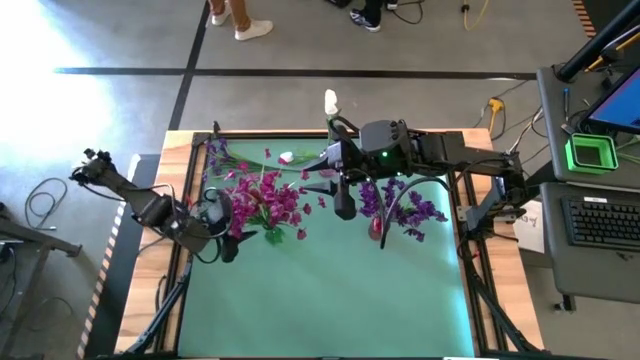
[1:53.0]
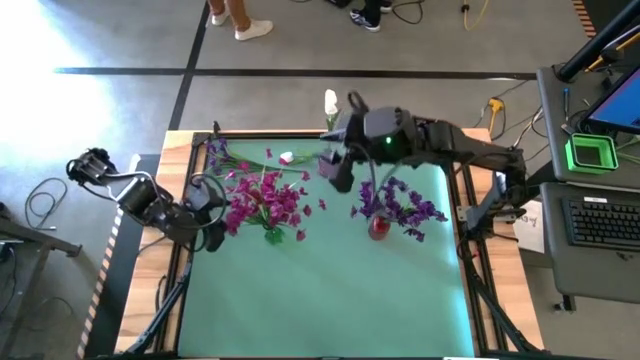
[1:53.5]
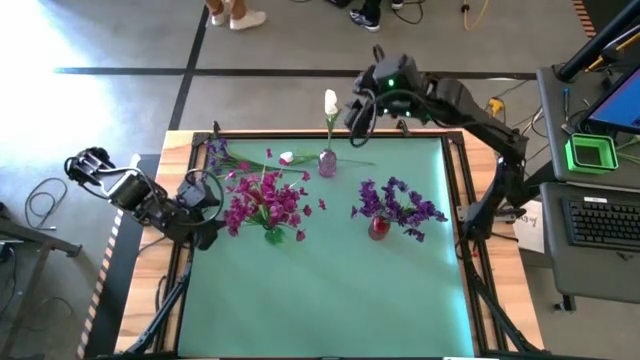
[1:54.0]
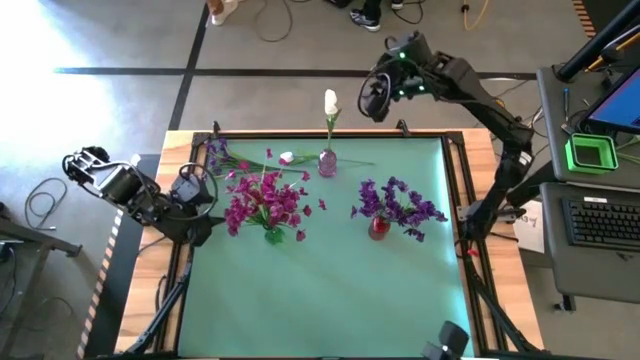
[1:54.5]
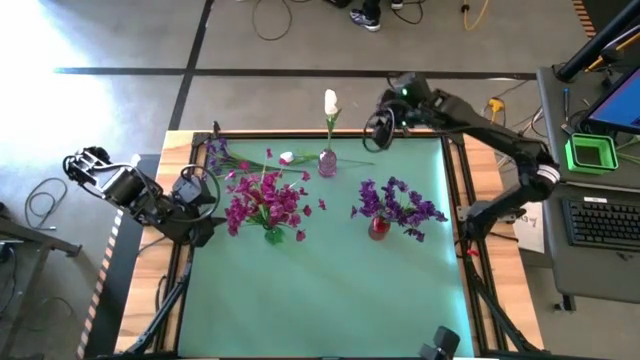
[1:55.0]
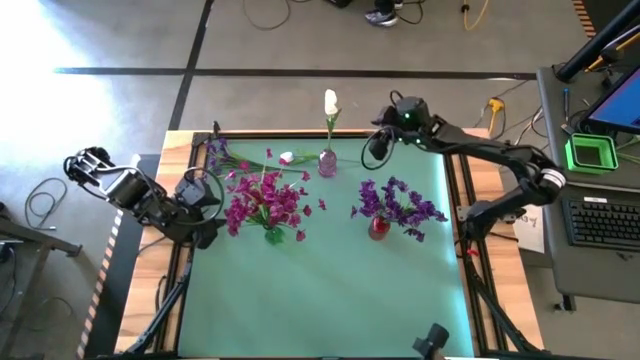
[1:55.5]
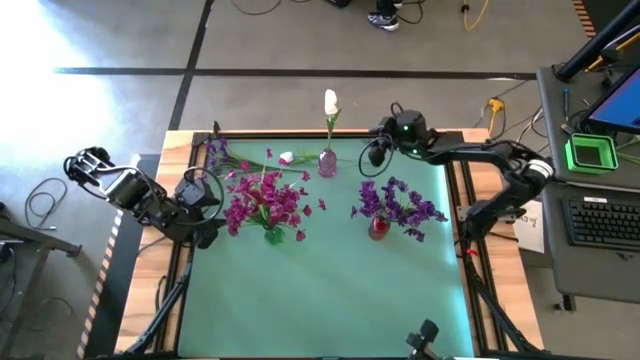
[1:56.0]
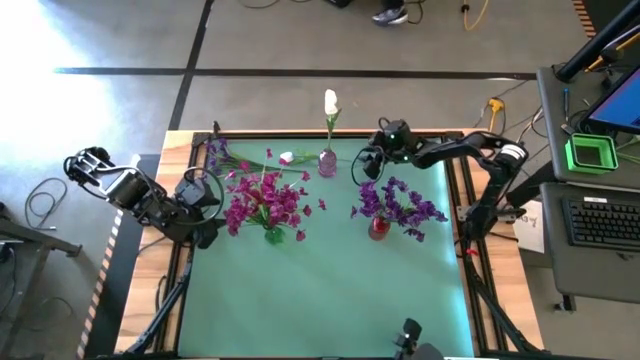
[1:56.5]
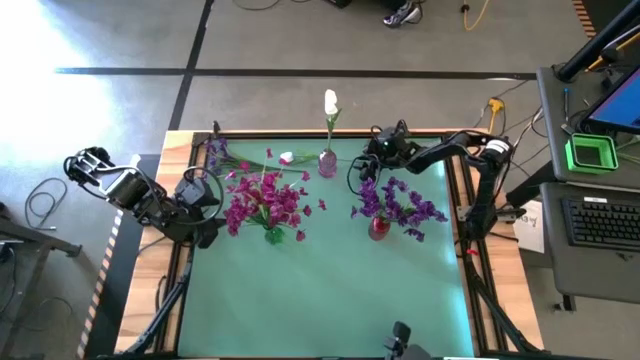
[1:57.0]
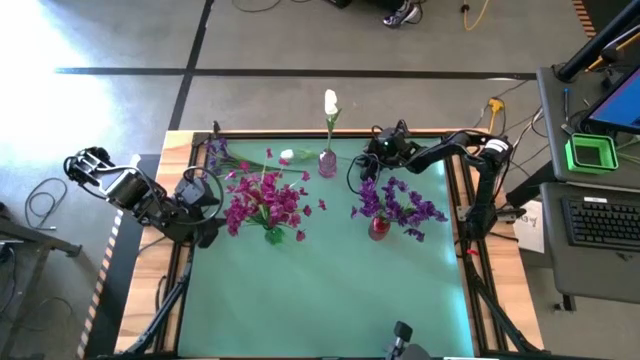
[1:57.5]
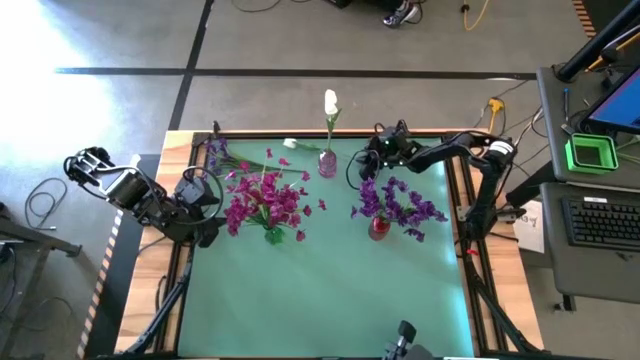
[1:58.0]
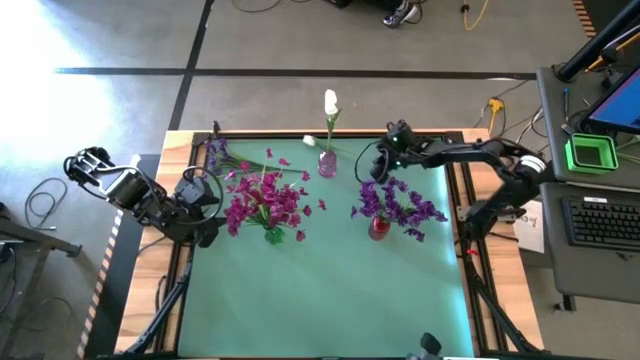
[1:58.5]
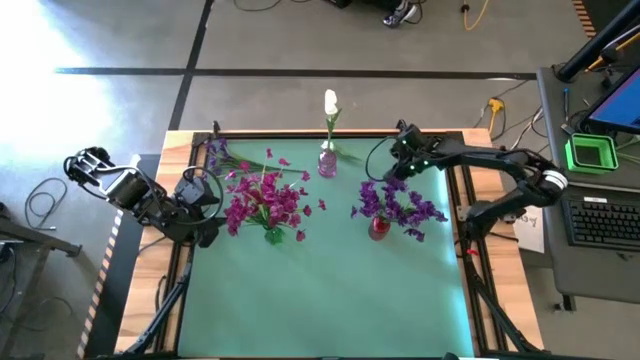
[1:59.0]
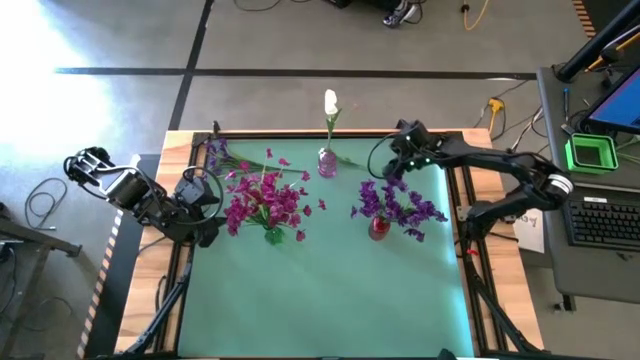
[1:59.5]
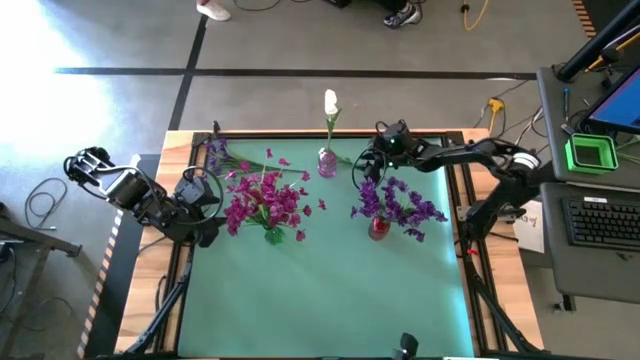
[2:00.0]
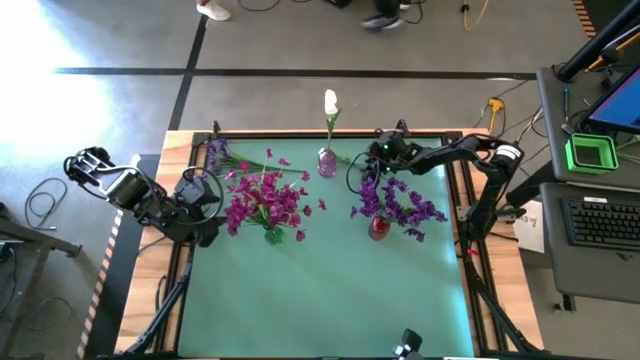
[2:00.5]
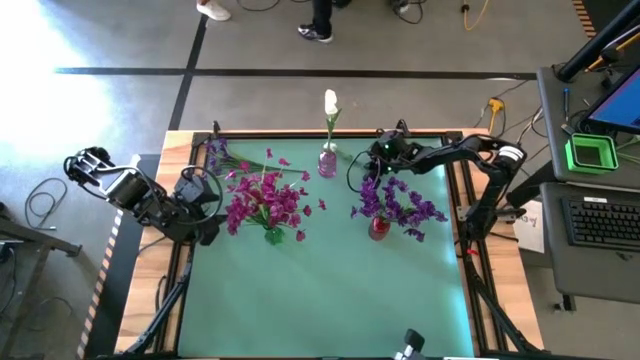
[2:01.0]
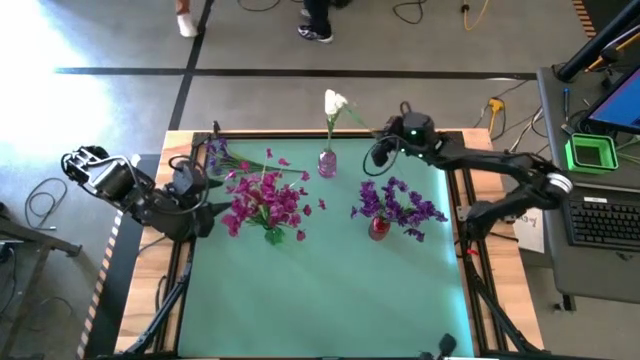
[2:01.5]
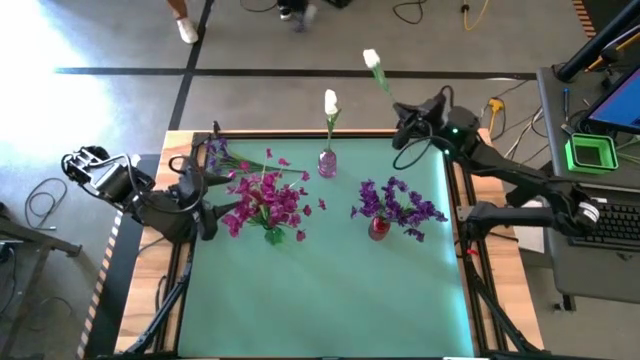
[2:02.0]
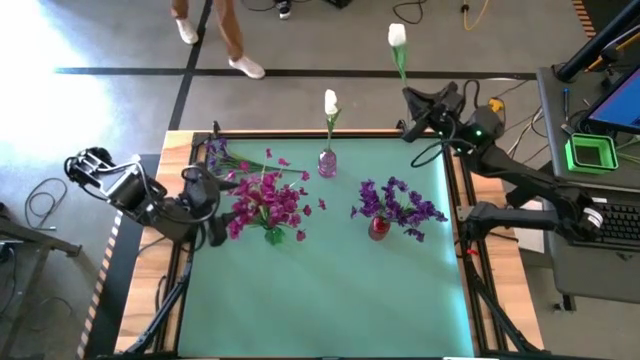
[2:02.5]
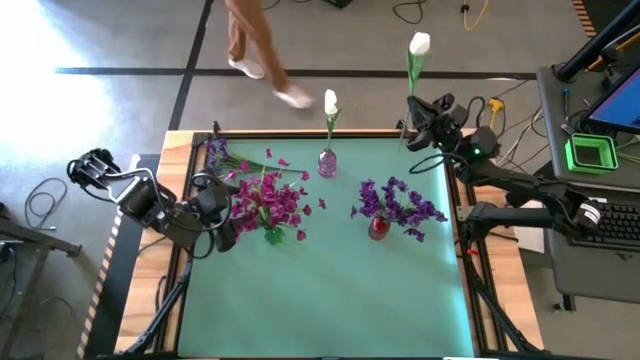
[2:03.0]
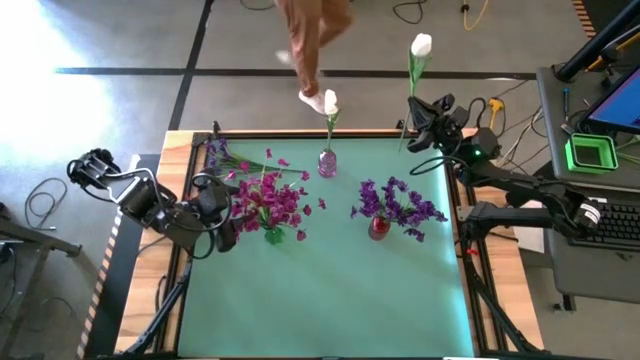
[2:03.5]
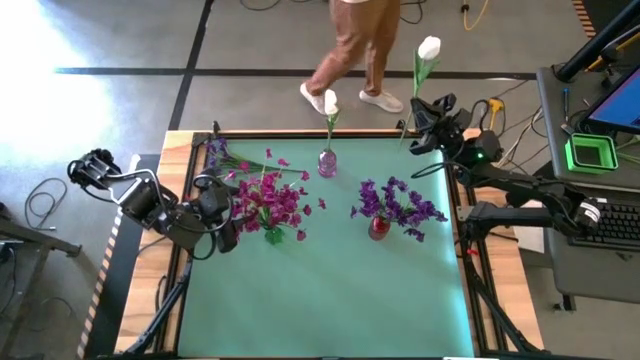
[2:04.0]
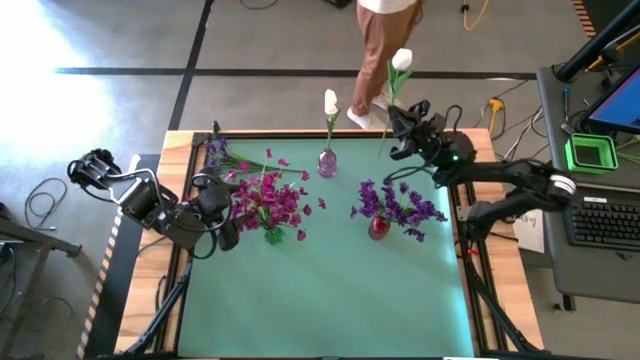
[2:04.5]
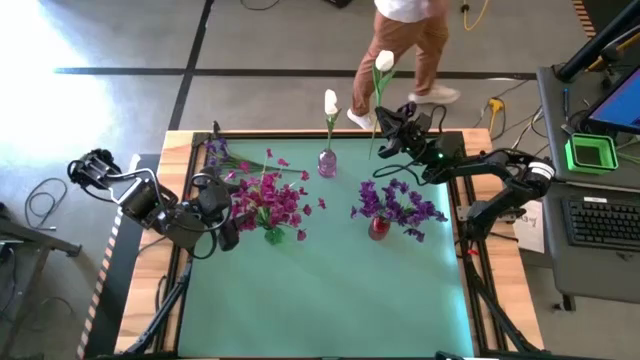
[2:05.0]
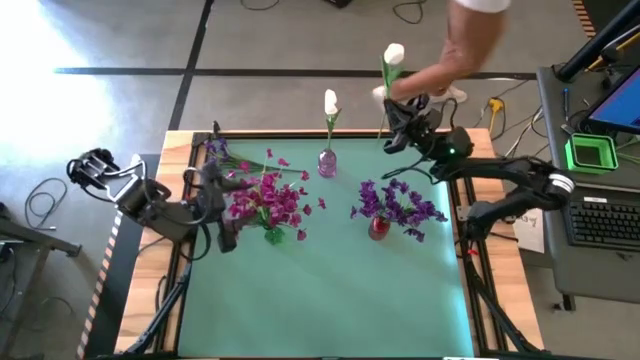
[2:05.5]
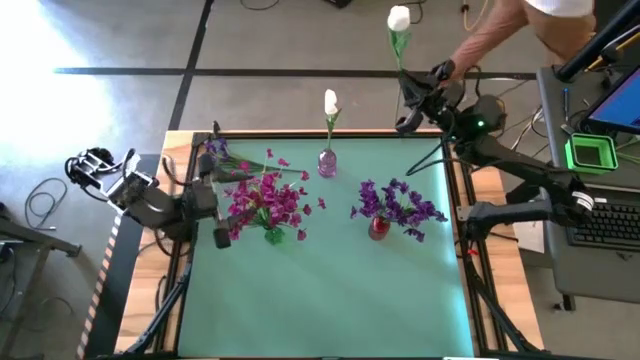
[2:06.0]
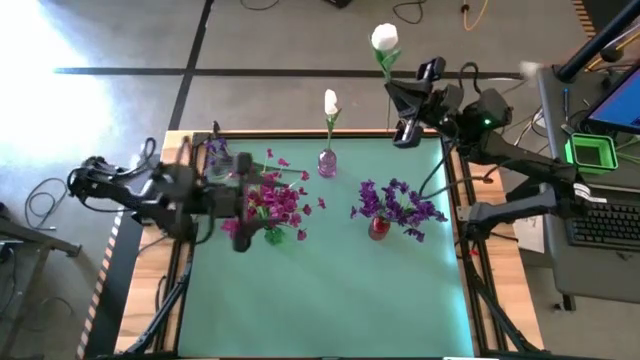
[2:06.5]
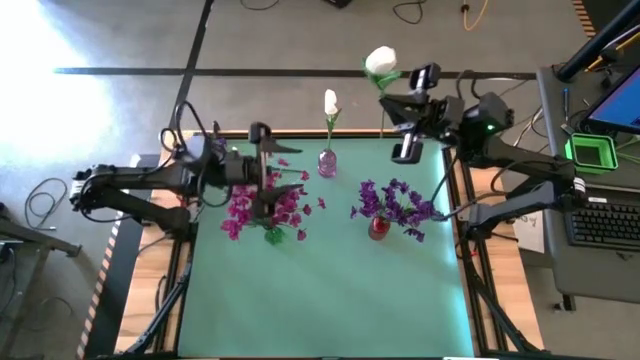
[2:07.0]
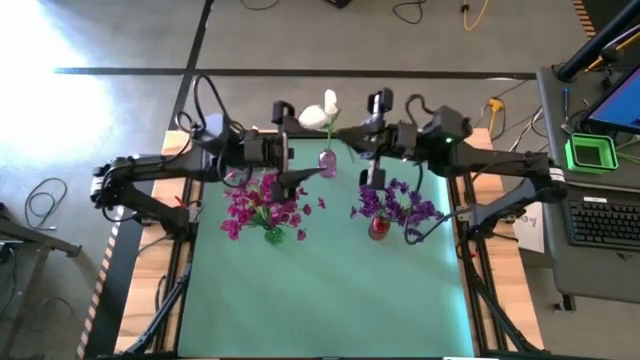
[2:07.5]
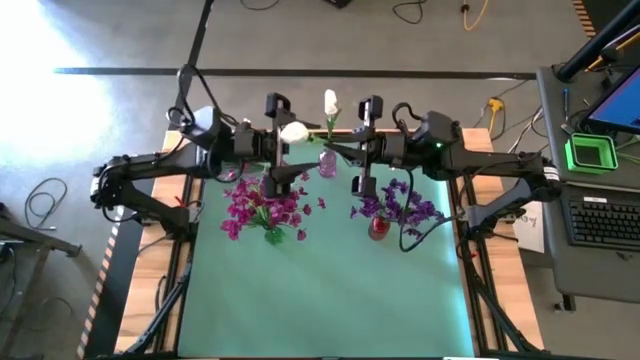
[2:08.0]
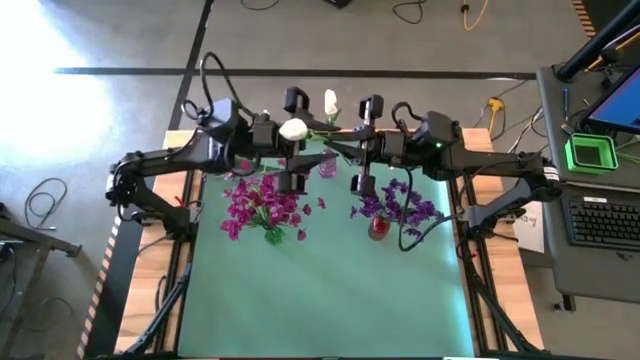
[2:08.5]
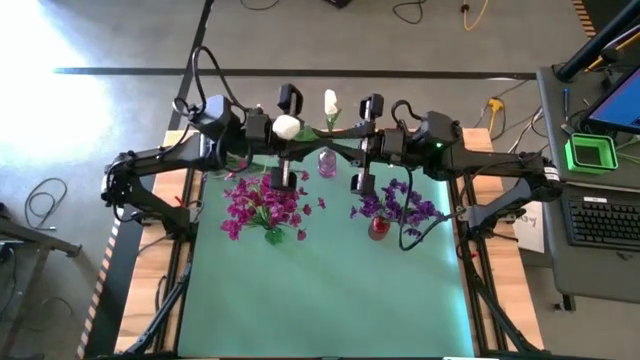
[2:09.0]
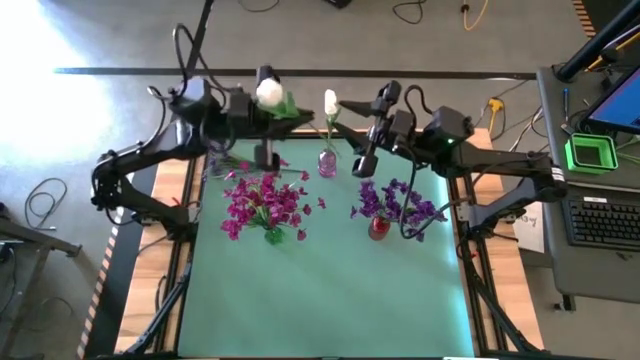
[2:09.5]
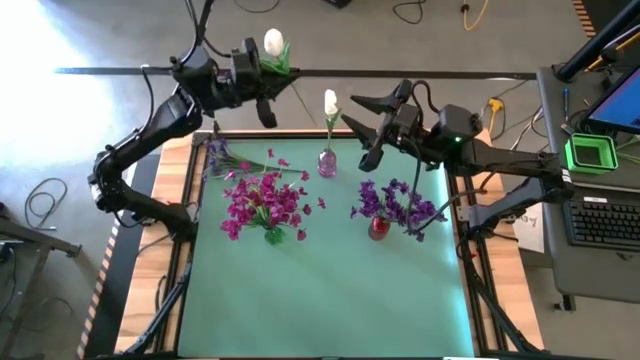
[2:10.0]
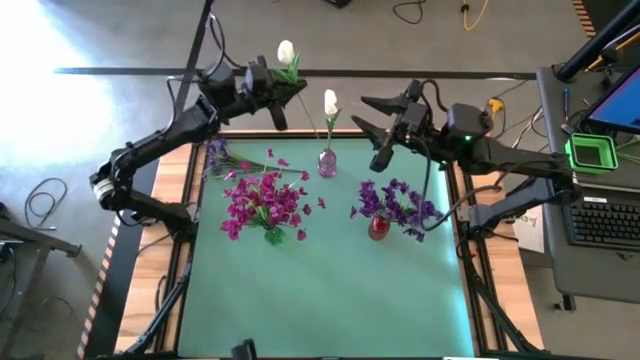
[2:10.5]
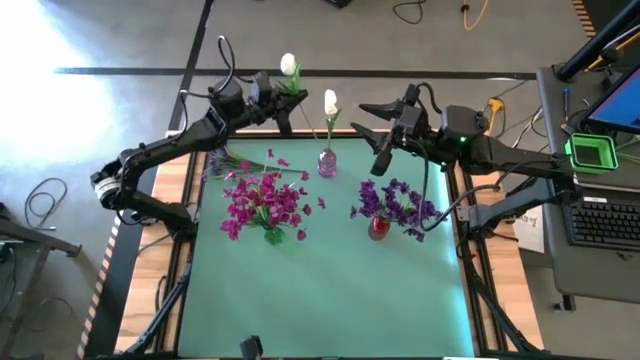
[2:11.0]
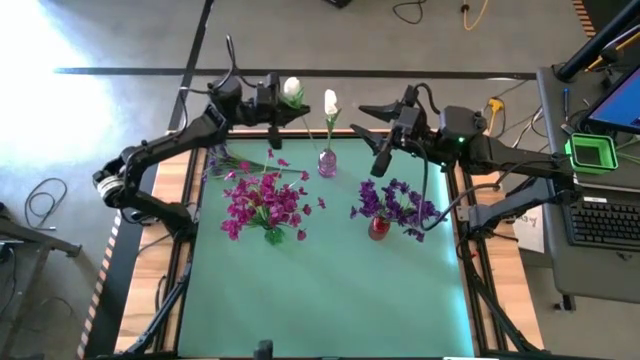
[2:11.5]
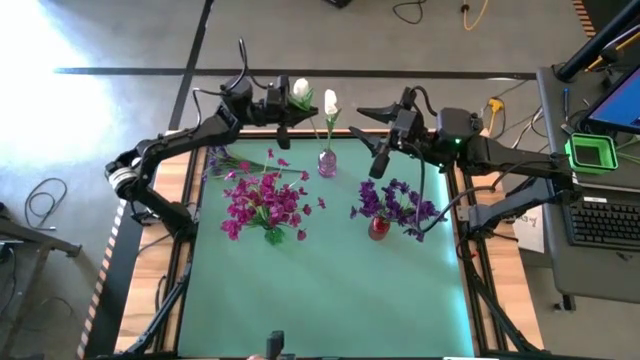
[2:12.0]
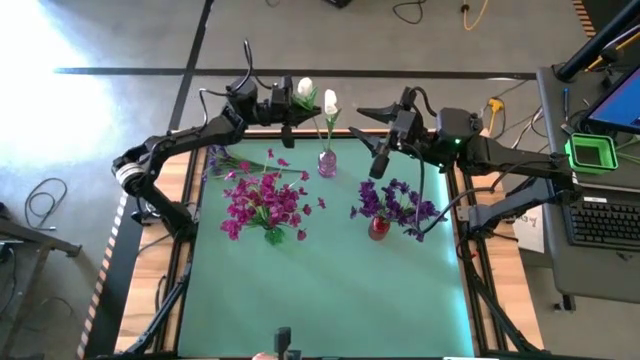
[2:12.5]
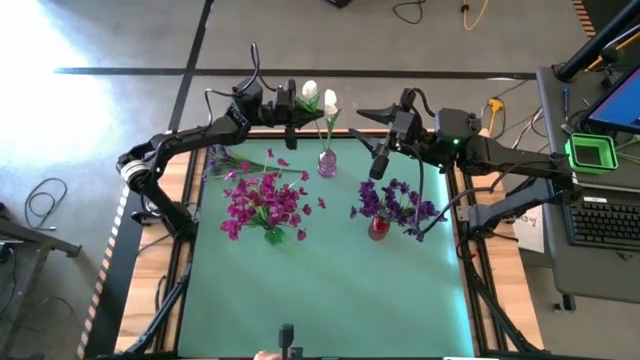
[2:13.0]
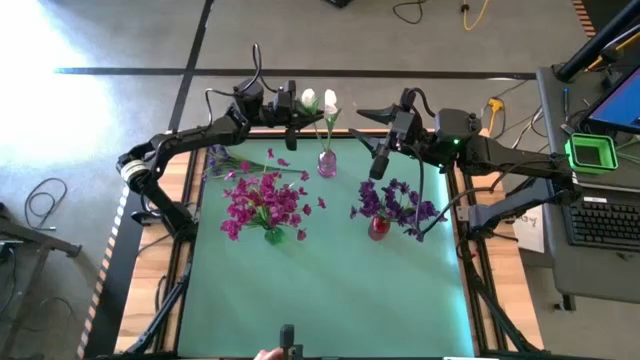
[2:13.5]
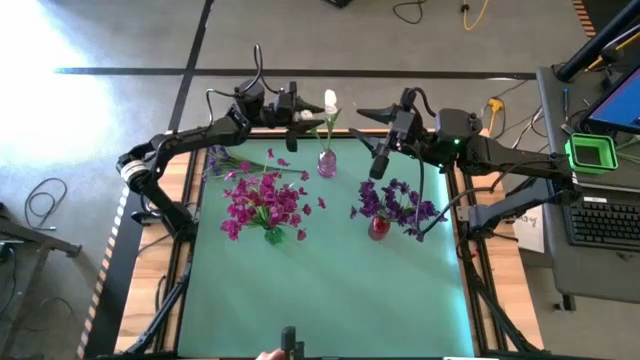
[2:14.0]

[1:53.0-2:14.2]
Task: Sort flowers into vase by color
Put the white tulip into the purple flower vase
